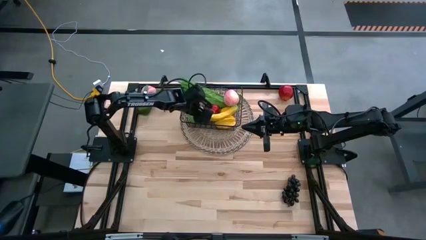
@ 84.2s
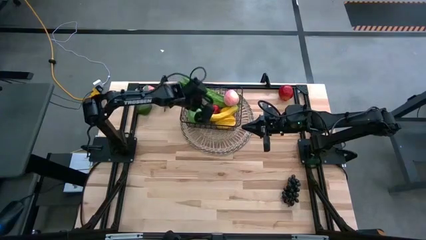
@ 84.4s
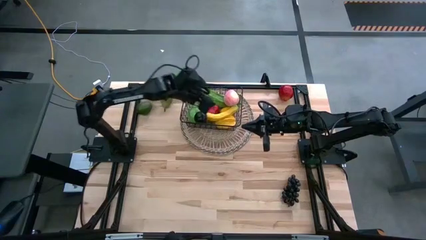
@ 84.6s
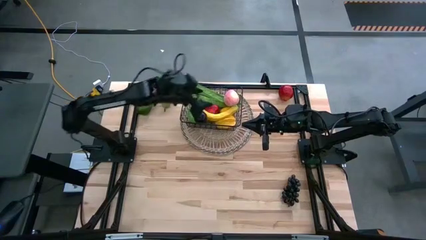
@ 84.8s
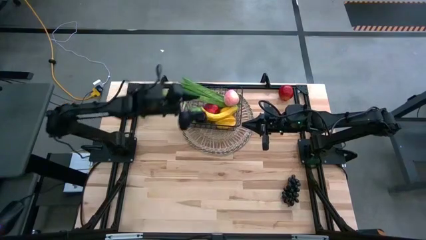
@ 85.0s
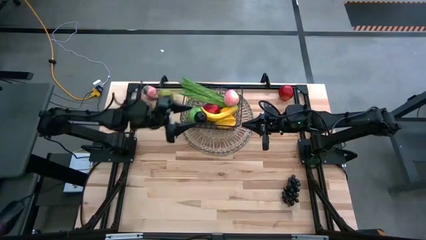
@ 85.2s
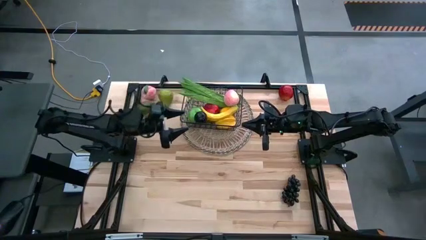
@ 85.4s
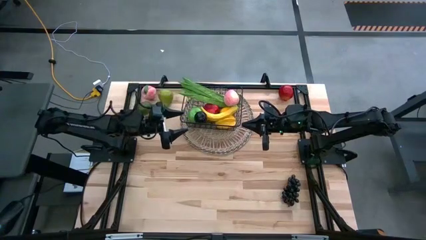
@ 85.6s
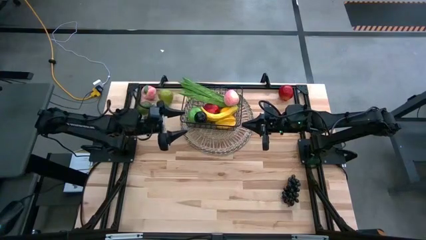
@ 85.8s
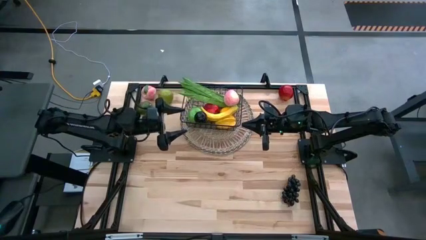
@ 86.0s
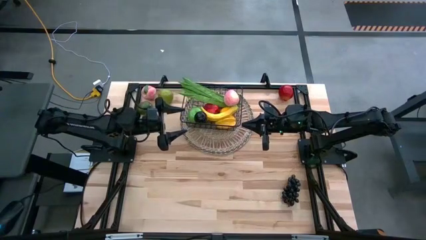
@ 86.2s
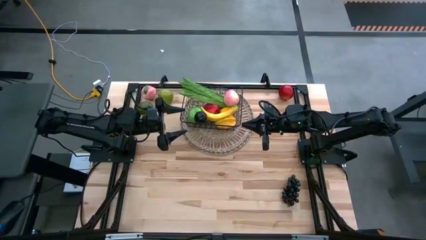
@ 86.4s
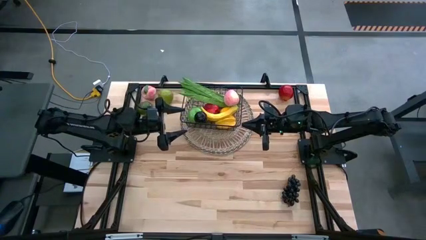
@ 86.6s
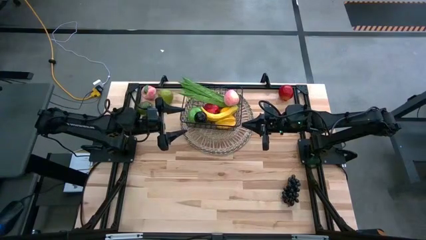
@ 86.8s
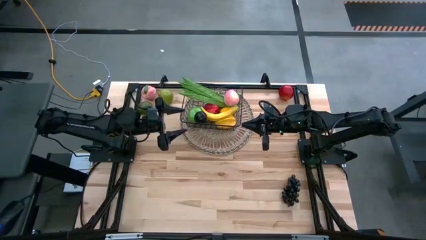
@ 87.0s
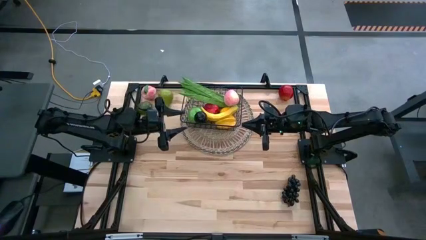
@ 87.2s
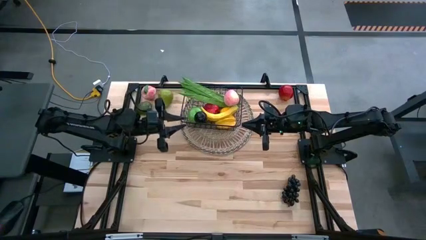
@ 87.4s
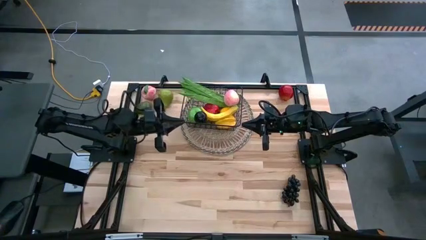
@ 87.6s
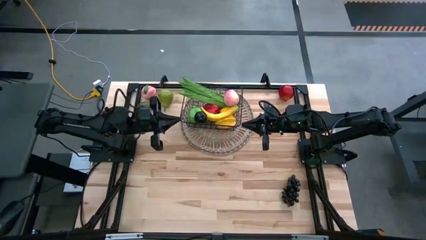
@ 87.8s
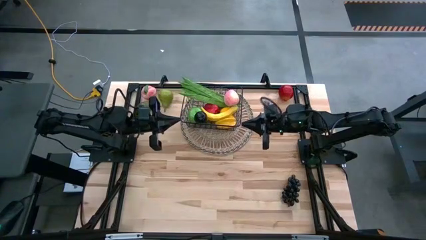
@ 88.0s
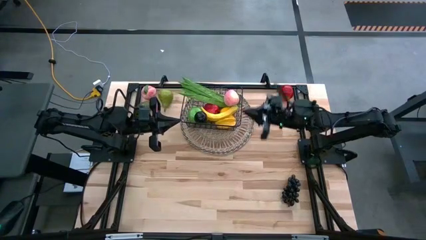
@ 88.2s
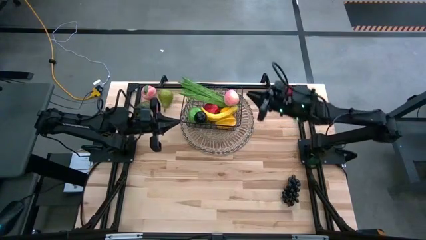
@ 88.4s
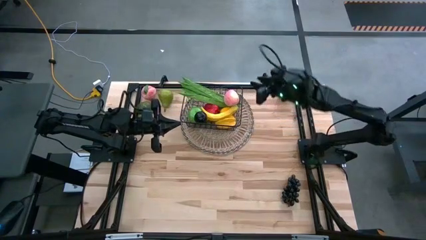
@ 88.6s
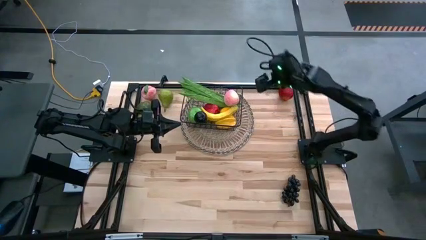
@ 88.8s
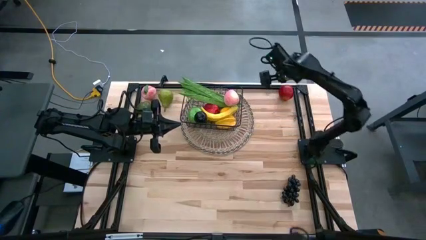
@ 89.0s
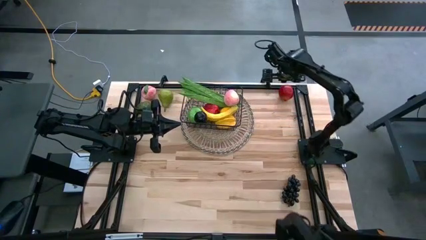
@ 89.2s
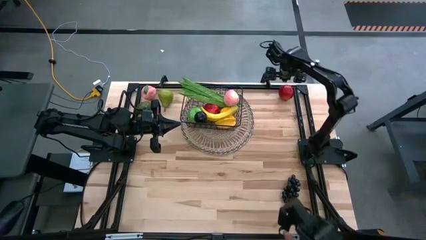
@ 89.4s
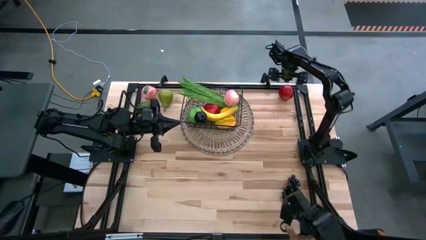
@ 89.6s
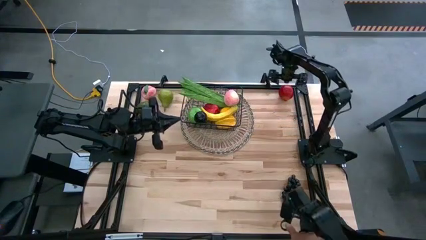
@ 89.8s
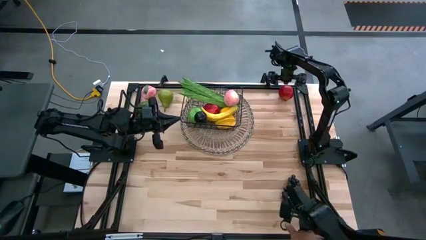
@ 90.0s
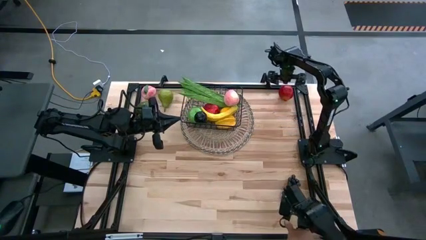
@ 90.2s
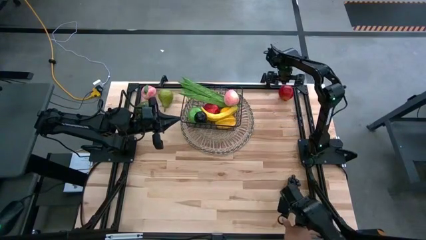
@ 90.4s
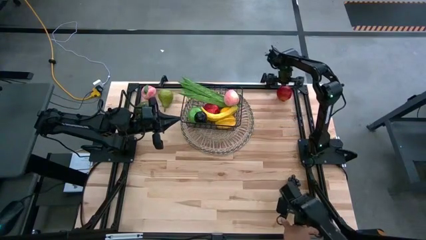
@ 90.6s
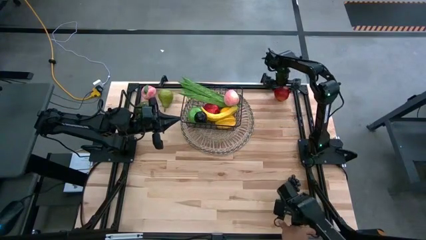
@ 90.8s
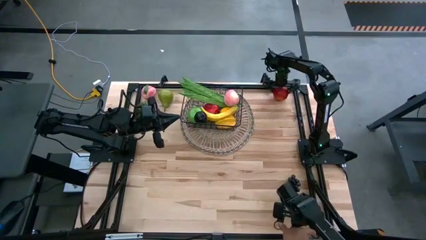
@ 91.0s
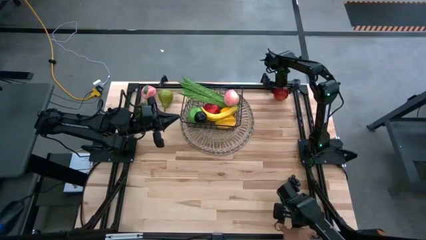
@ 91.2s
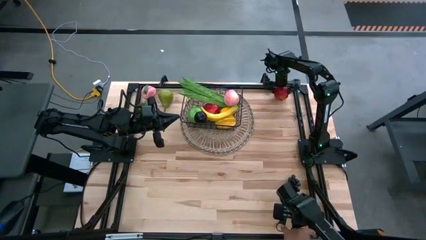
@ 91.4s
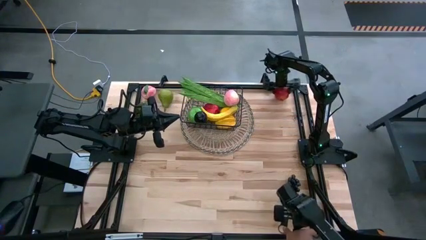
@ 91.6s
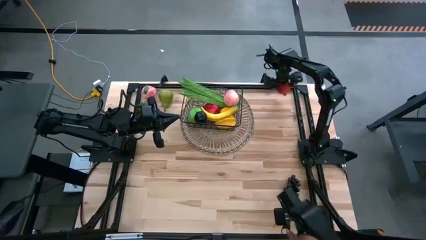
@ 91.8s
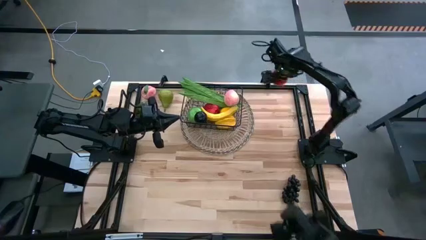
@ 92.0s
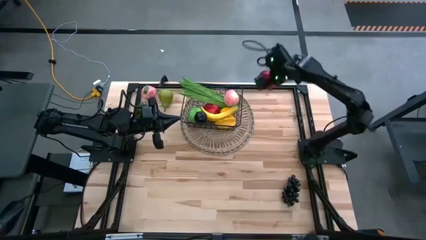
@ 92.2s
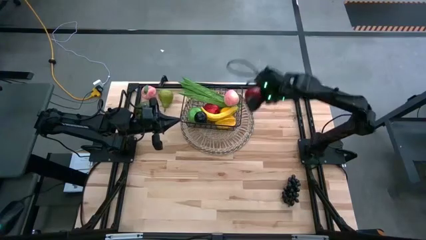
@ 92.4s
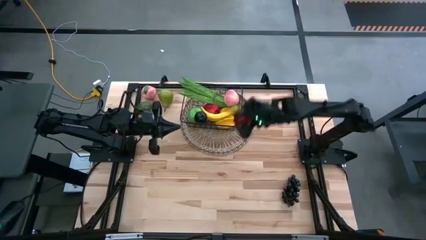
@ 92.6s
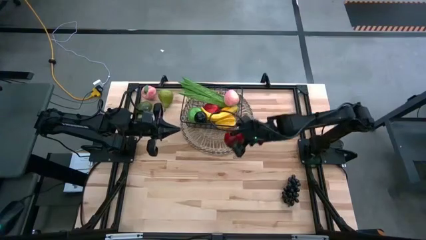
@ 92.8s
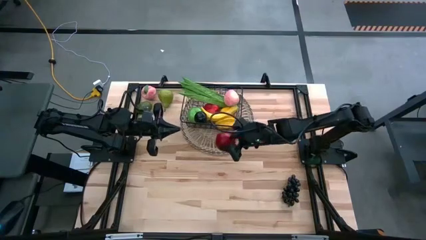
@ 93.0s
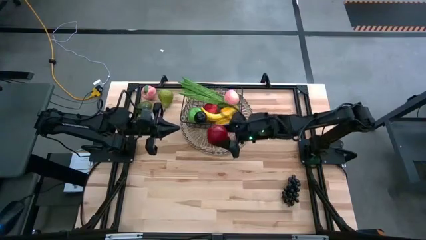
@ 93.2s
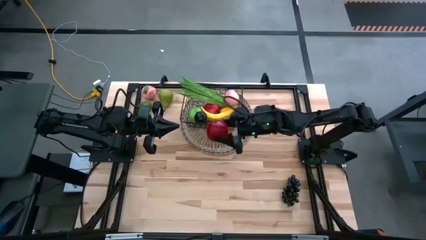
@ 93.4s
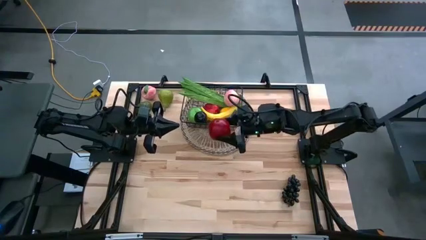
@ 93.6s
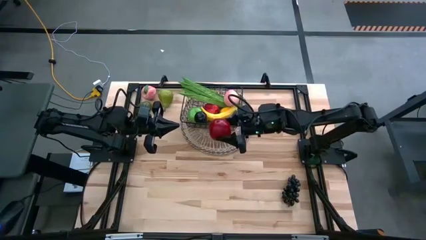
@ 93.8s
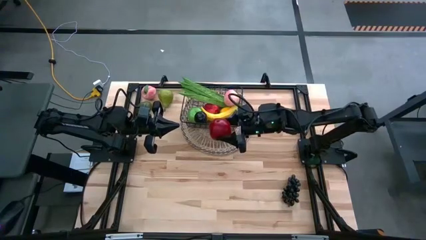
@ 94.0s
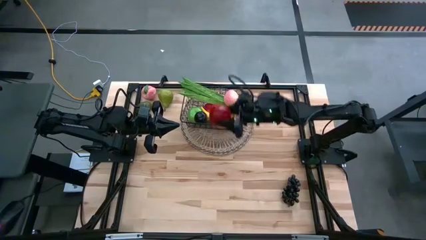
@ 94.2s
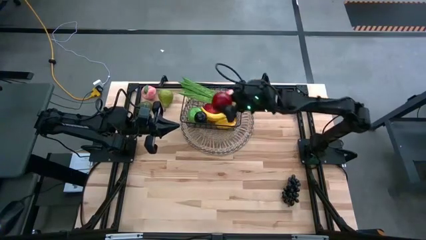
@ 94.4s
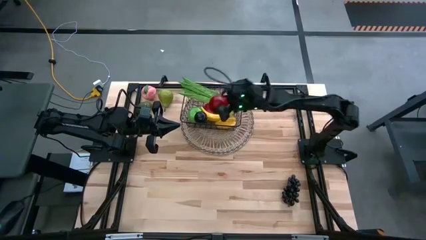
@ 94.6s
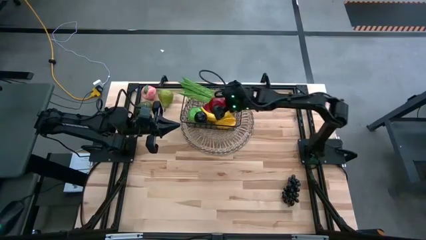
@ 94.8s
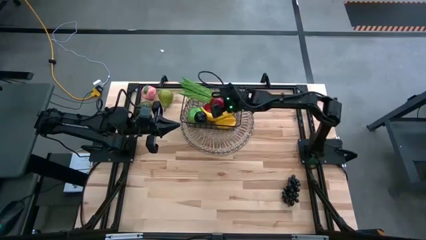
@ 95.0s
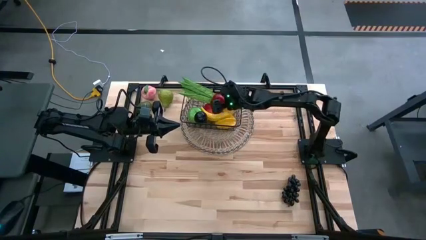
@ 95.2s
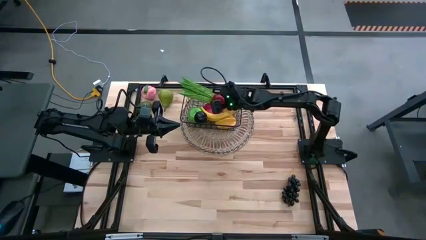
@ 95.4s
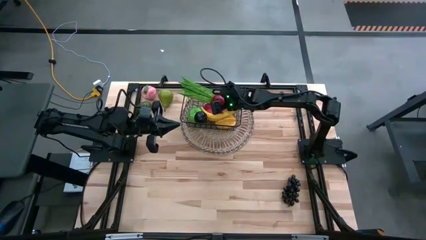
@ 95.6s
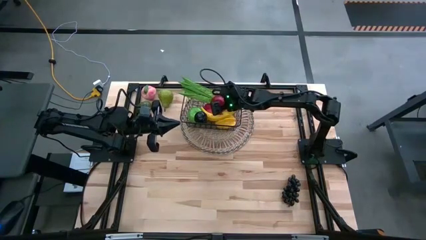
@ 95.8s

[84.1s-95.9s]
Task: Build produce basket
Put the pomegranate into the black wire basket

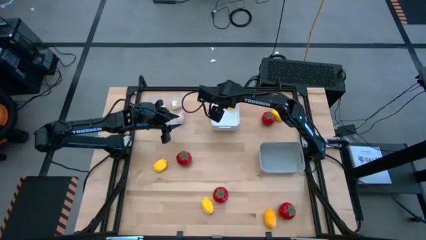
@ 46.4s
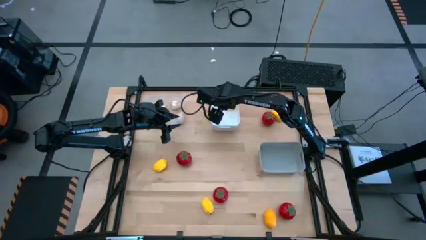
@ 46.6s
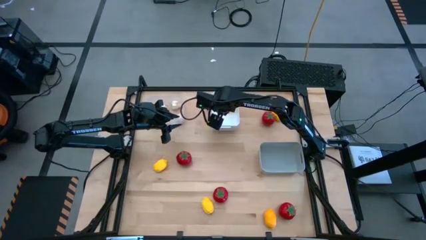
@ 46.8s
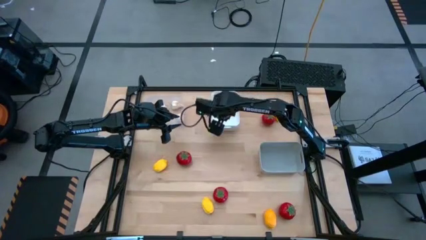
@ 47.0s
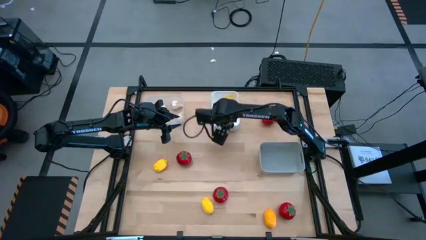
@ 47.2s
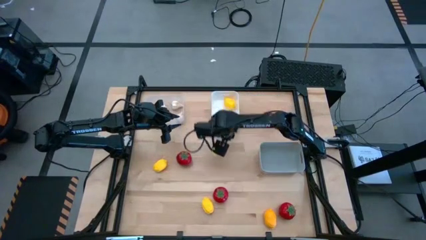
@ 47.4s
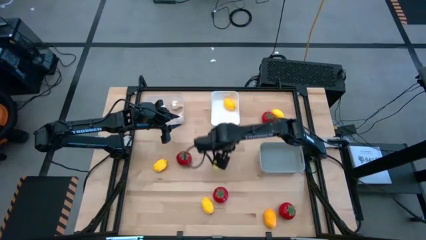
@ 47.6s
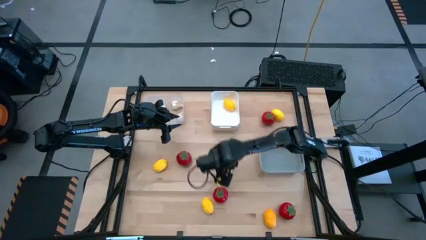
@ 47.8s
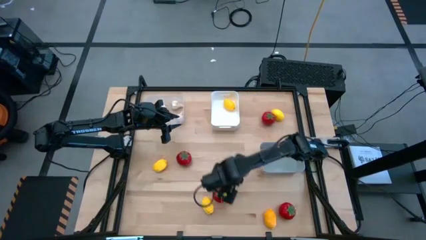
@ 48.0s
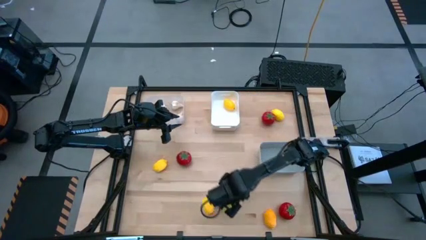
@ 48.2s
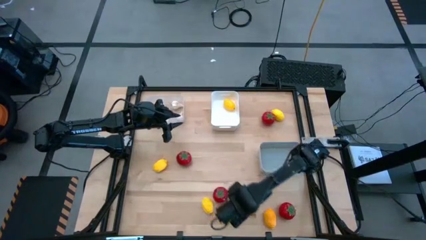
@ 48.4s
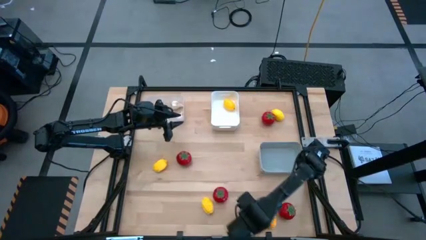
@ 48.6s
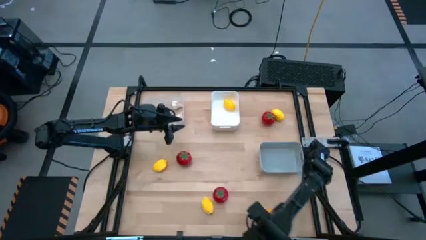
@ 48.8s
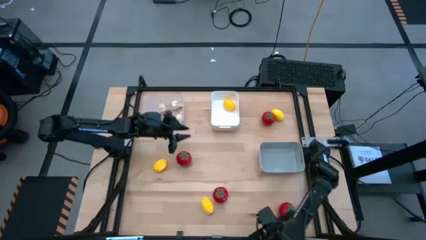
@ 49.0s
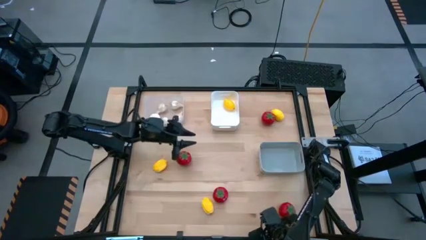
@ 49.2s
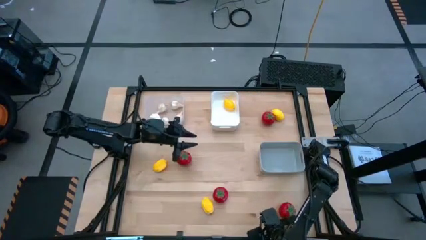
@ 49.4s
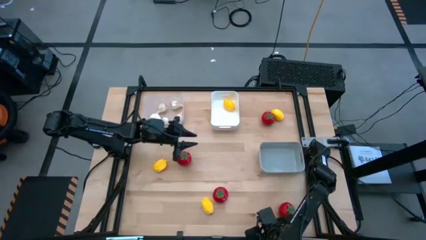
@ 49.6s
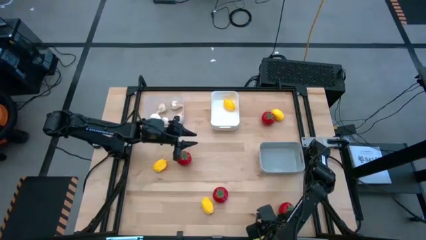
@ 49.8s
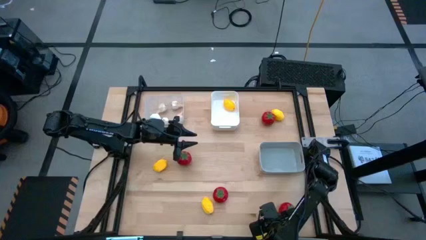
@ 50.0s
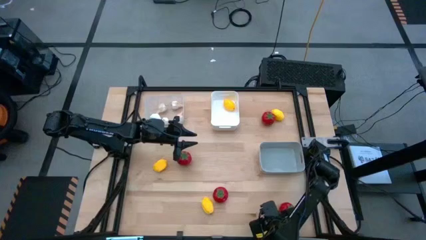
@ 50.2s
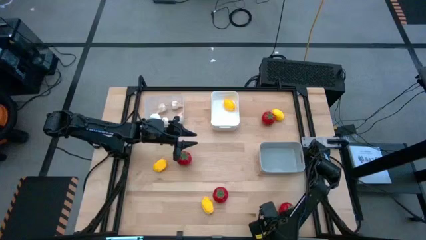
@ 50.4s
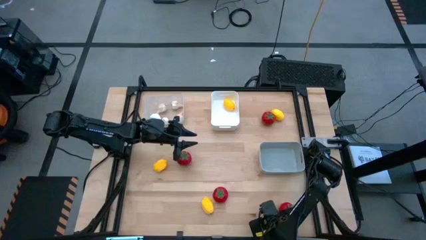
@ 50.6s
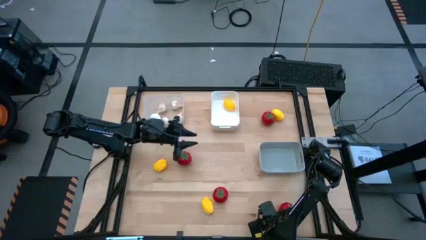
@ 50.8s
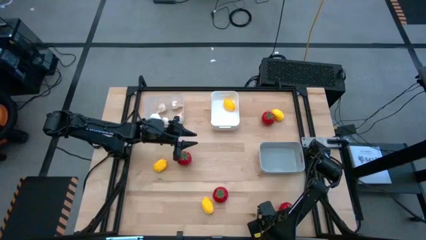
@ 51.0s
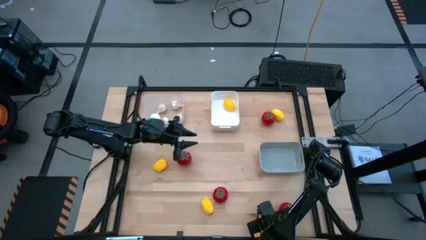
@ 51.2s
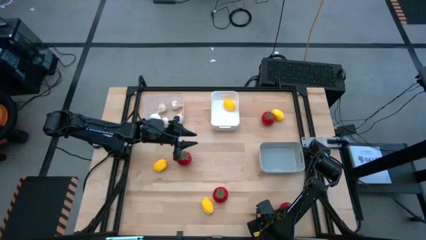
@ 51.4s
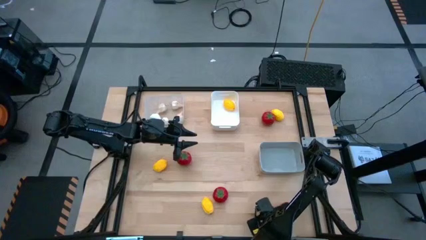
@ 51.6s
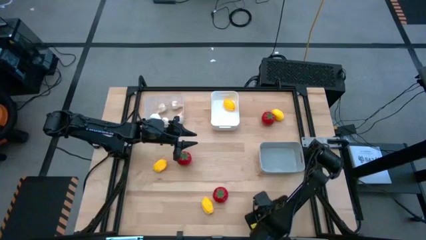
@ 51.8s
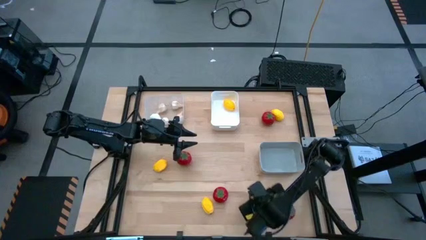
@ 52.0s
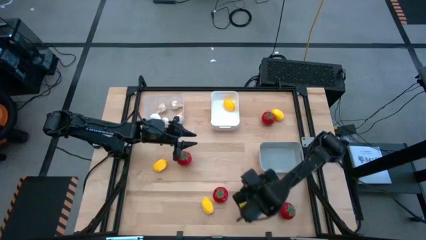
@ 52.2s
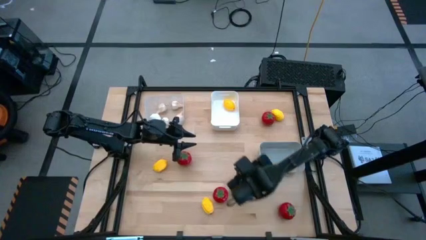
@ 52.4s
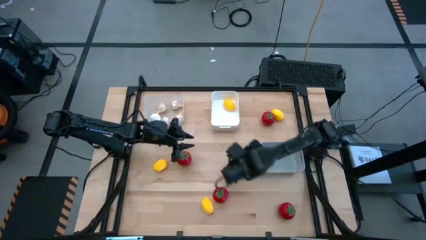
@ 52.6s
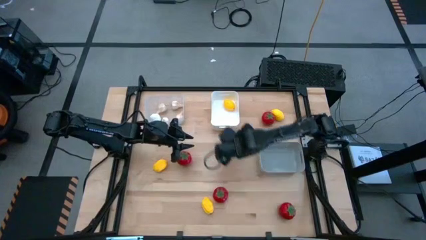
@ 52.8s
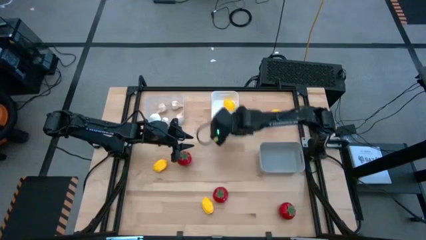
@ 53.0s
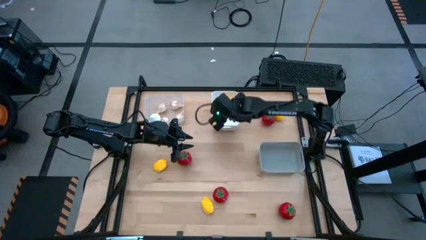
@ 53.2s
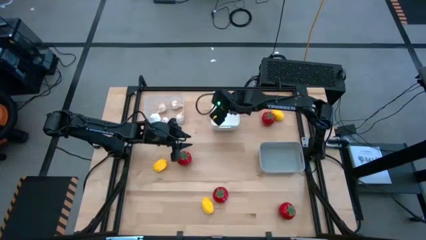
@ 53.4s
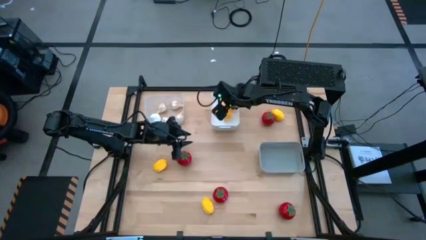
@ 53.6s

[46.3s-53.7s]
Task: Sort produce into baskets
Put the lemon into the white bin
